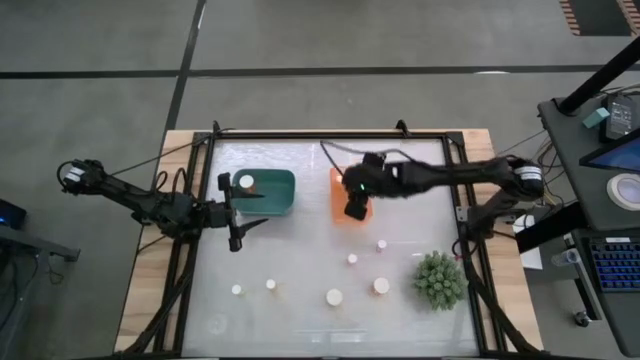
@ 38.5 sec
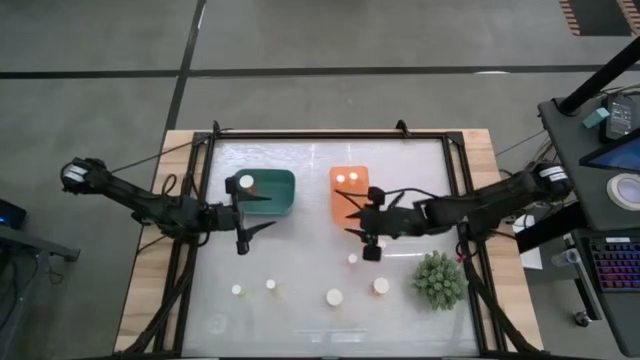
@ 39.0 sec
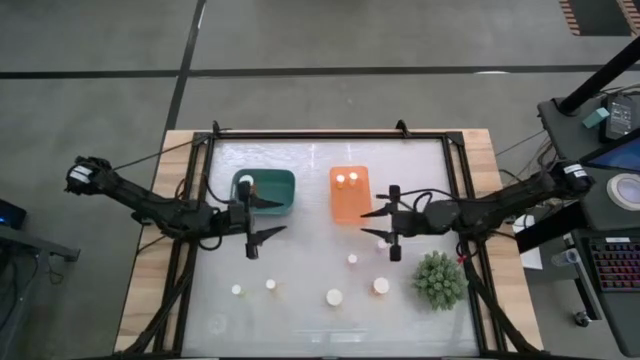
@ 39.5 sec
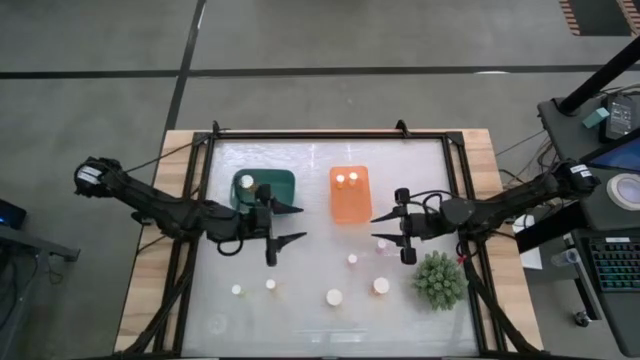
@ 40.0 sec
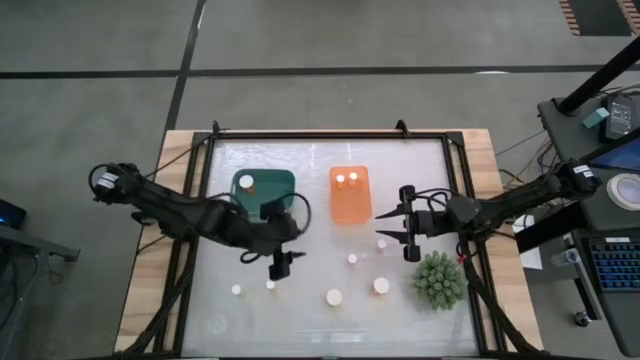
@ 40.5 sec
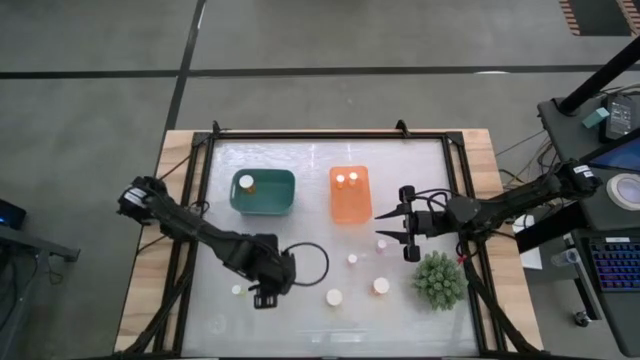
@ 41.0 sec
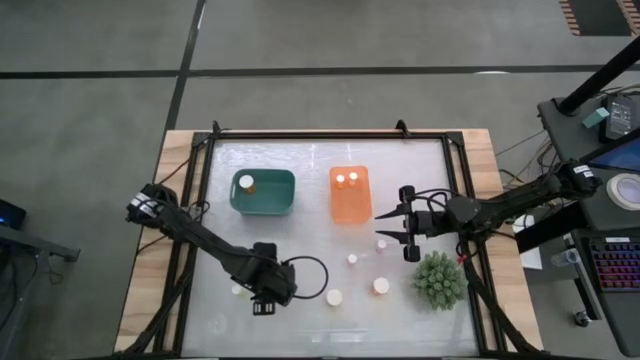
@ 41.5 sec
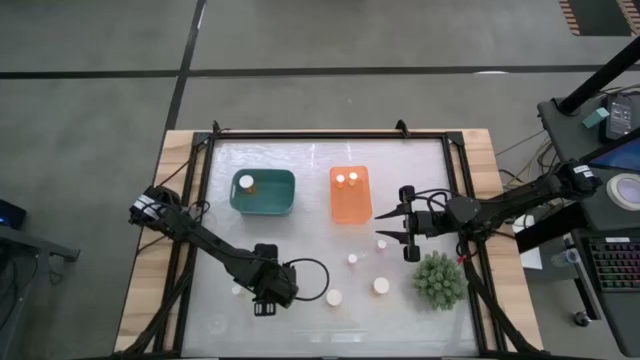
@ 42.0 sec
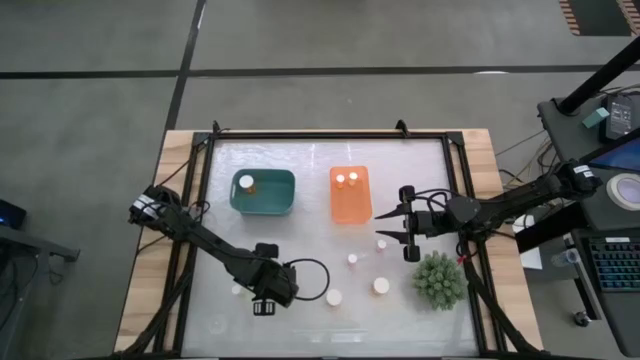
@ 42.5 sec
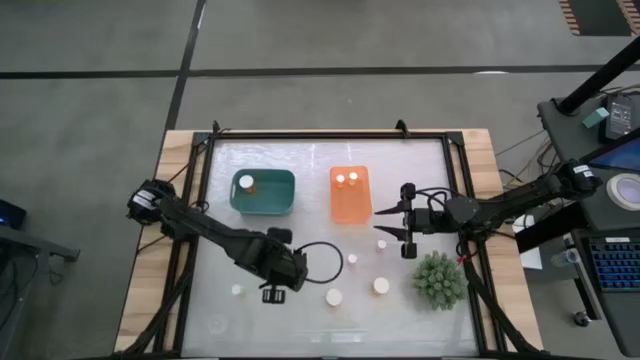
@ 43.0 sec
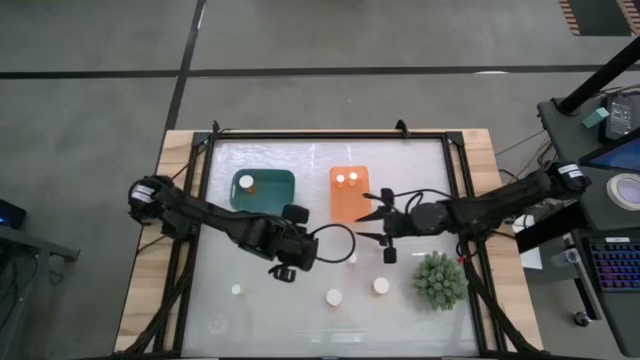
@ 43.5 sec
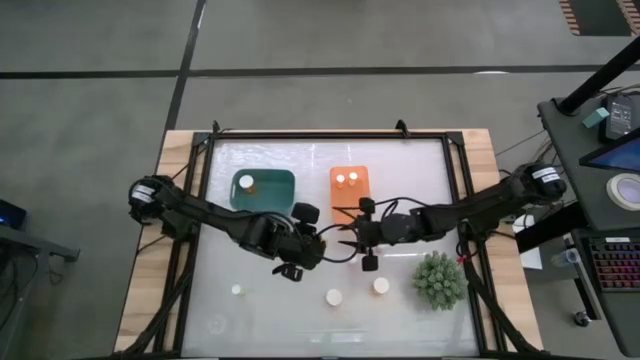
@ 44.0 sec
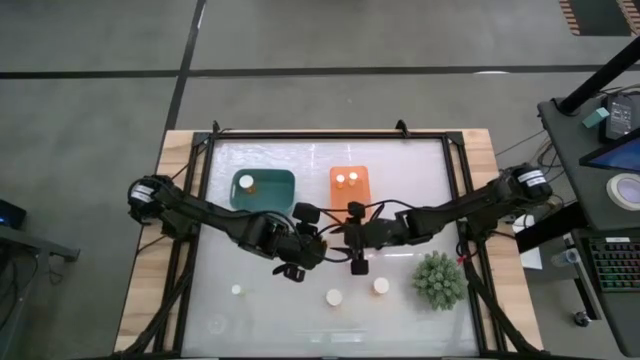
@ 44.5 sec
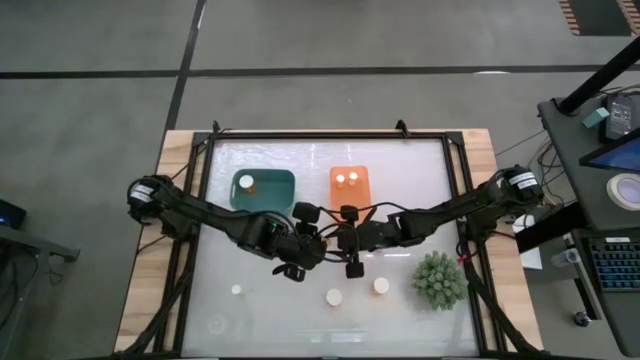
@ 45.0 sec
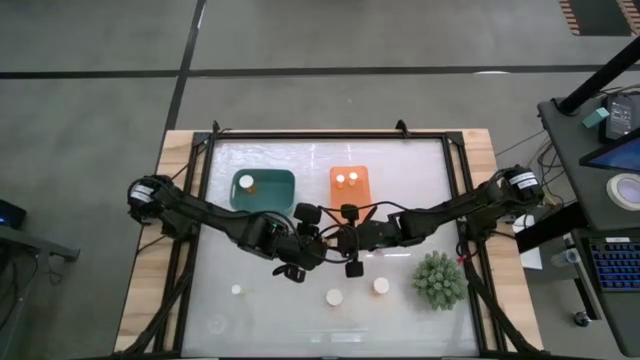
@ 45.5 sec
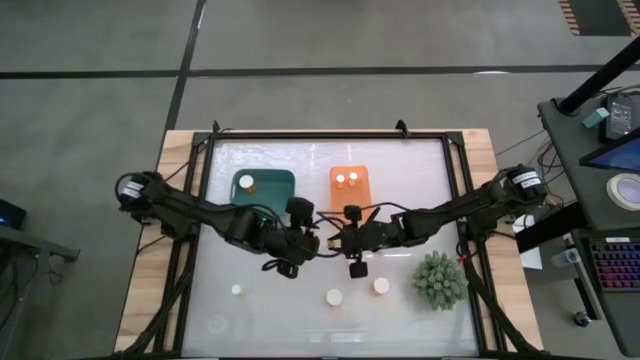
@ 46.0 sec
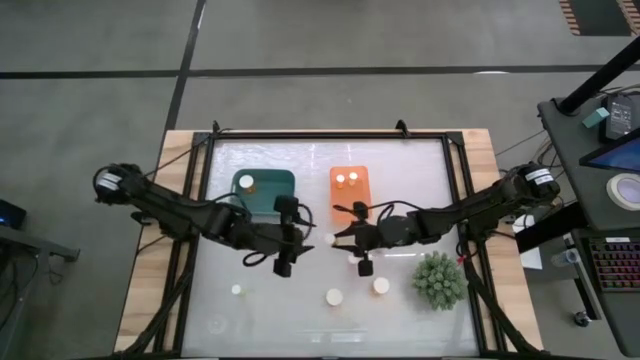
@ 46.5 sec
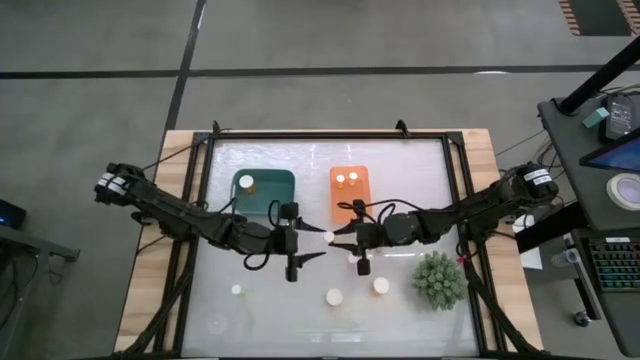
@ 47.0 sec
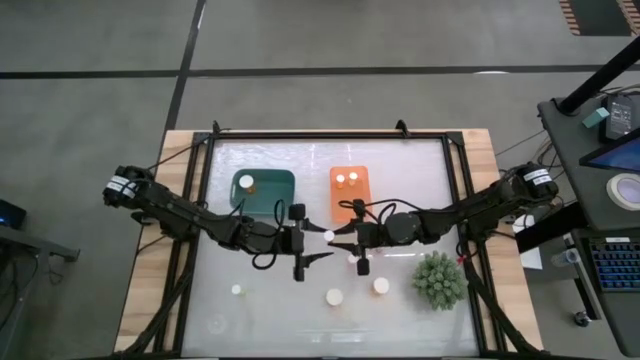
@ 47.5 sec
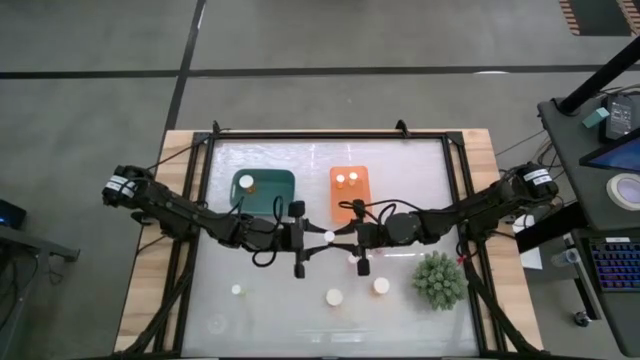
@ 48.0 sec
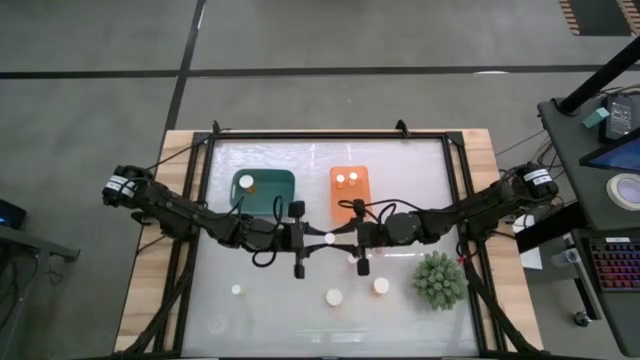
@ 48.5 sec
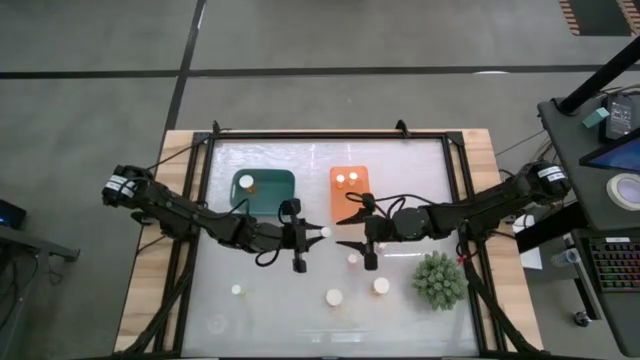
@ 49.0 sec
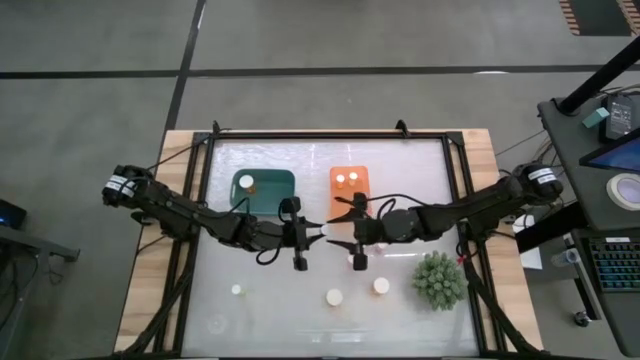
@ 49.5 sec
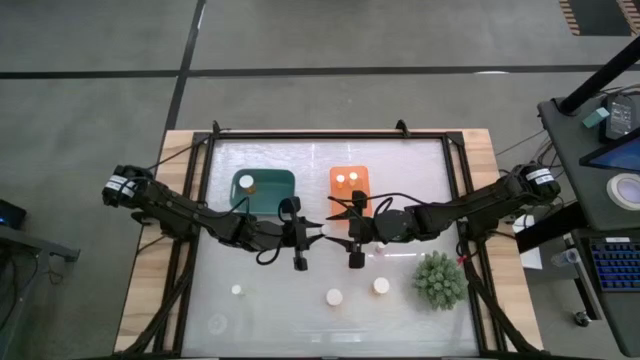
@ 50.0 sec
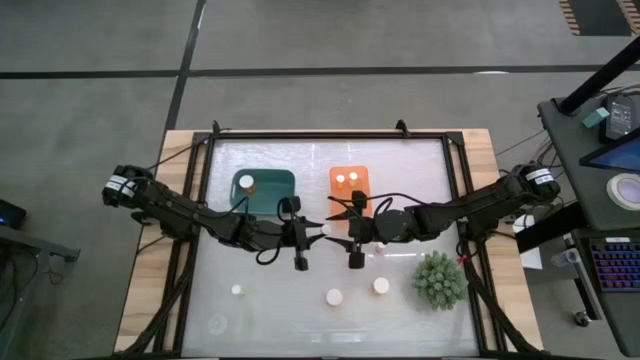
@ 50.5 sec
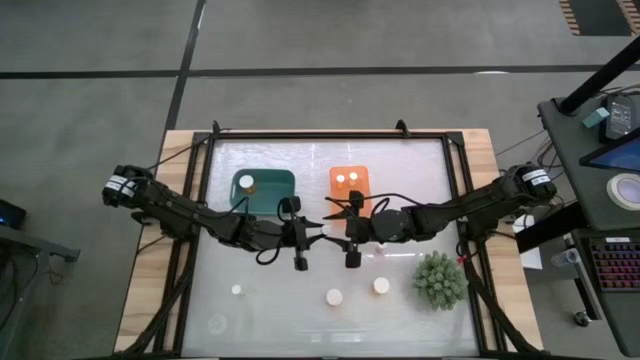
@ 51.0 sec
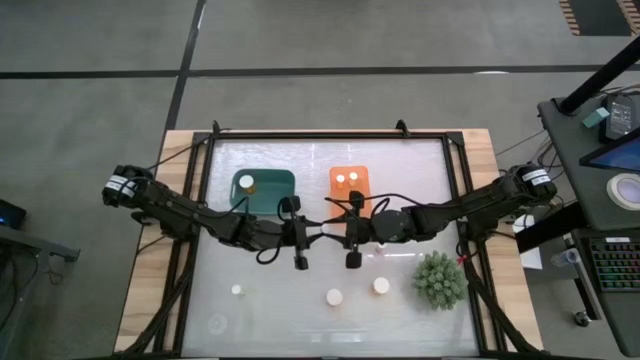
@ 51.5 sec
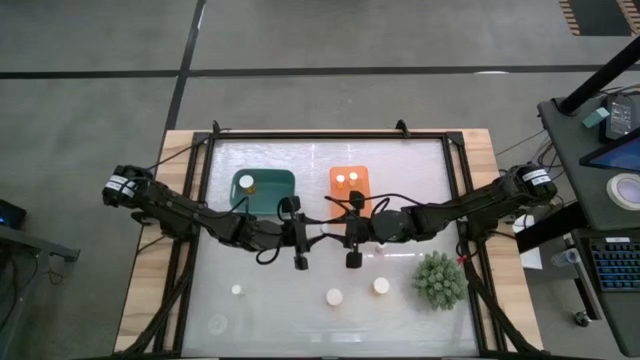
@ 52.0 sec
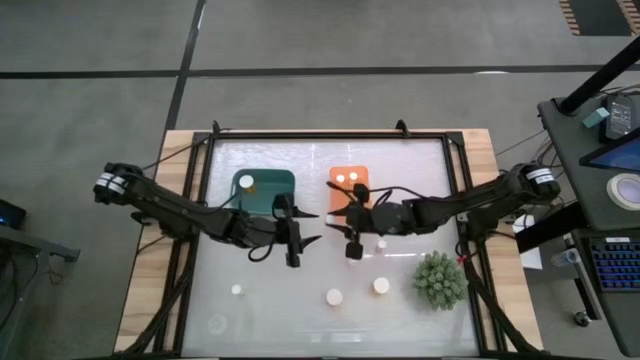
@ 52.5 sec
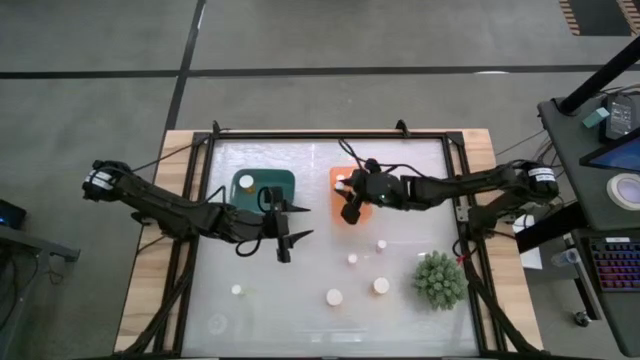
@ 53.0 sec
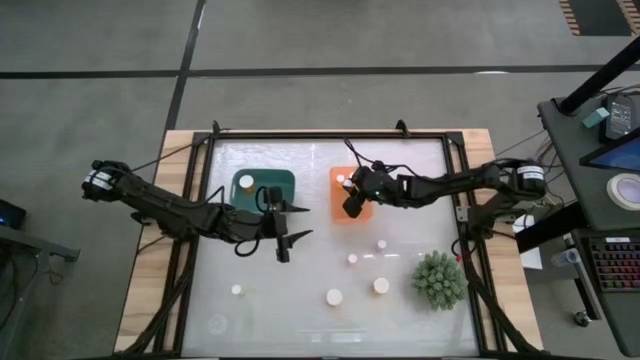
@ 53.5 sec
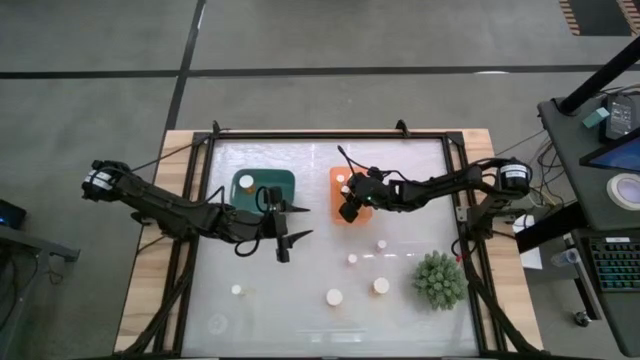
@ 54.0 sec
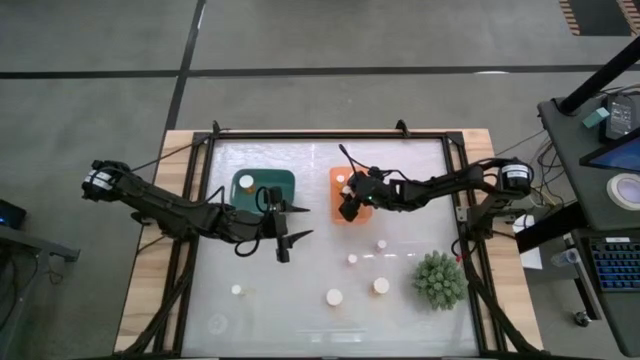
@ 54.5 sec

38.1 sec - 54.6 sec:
Task: Pick and place medicine bottles into bin by pill shape (circle, oval)
Put the small orange pill bottle into the orange bin

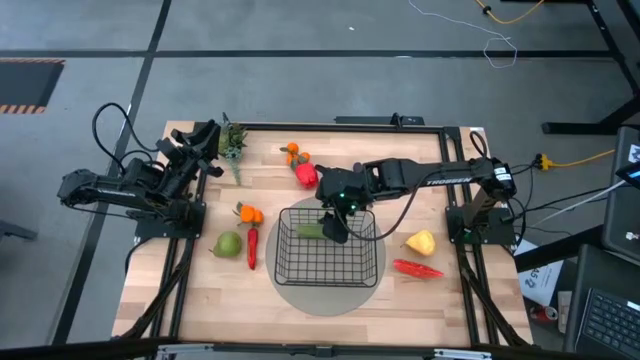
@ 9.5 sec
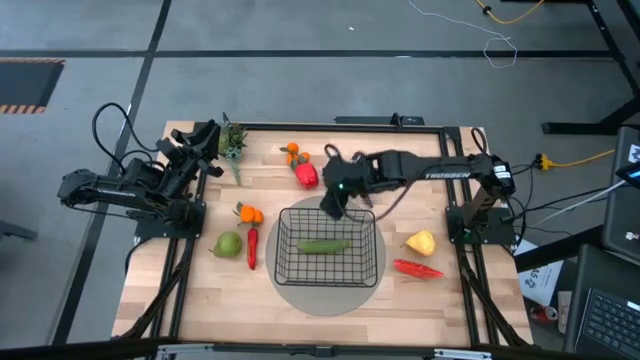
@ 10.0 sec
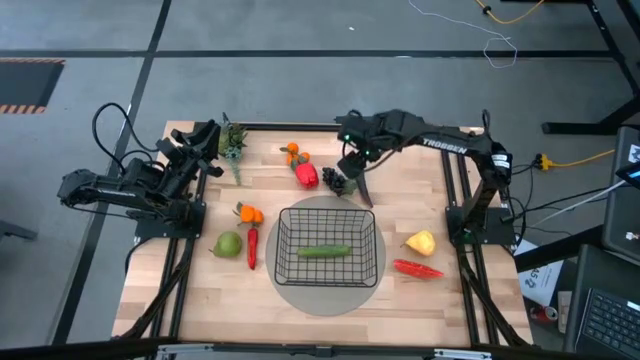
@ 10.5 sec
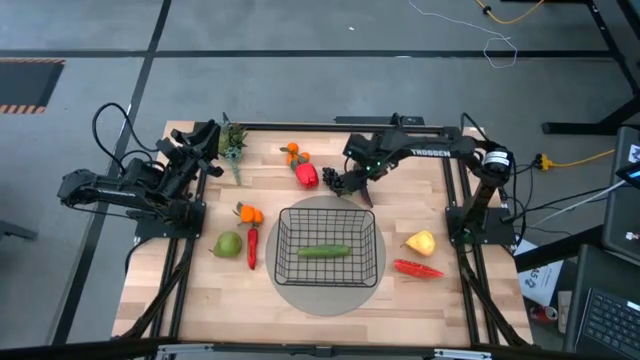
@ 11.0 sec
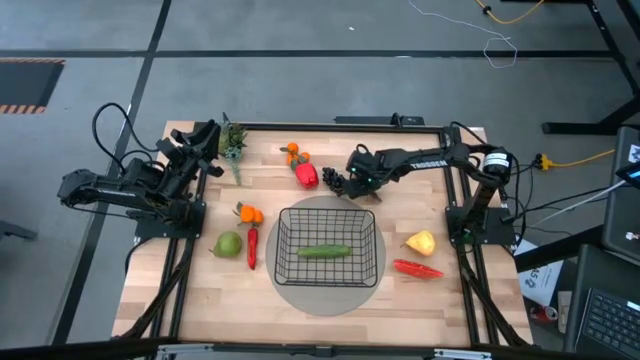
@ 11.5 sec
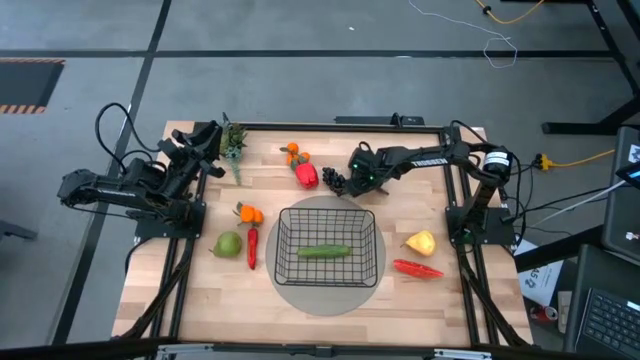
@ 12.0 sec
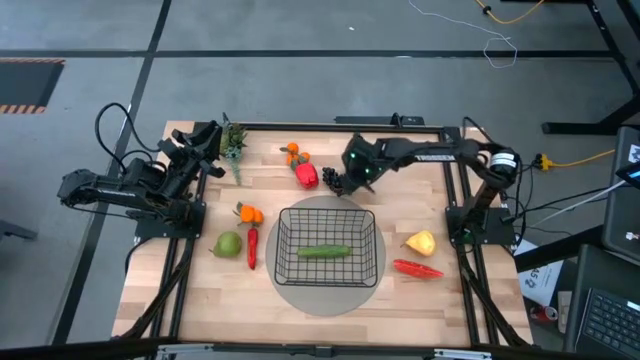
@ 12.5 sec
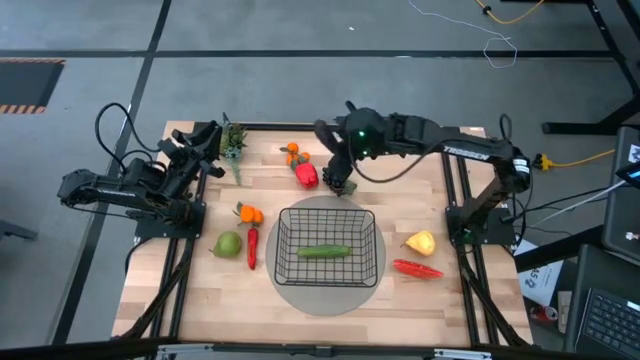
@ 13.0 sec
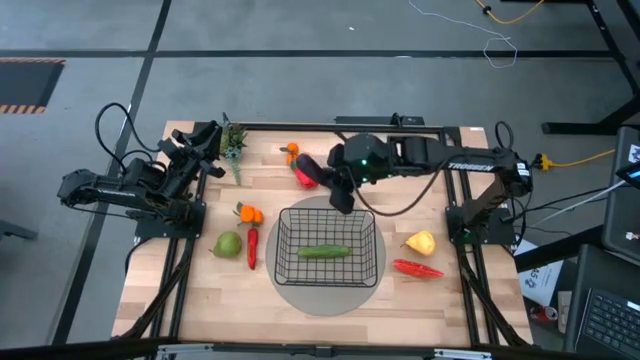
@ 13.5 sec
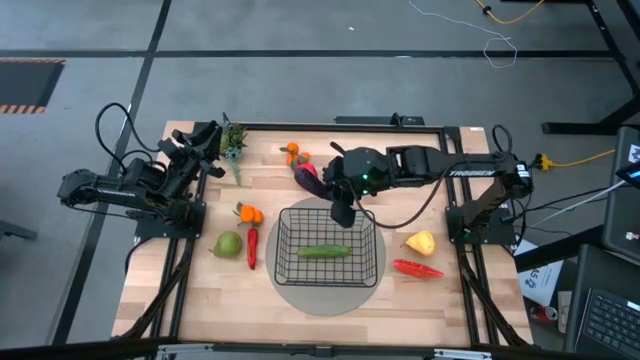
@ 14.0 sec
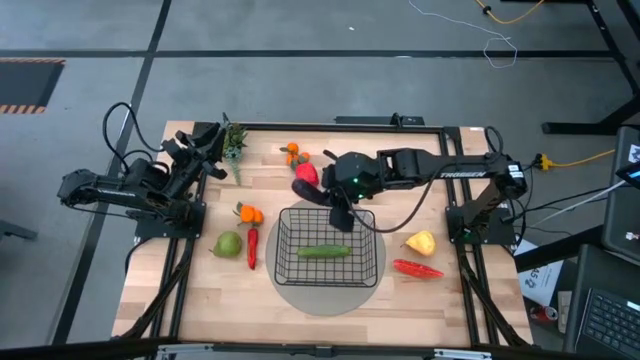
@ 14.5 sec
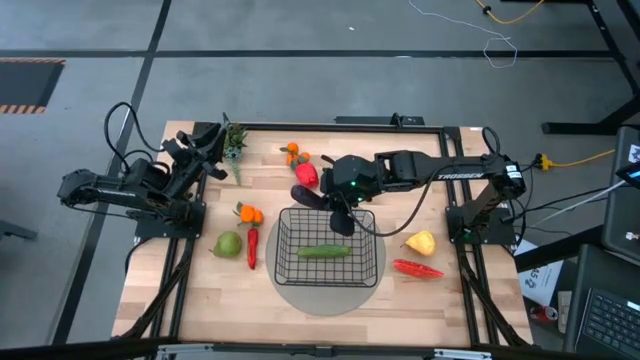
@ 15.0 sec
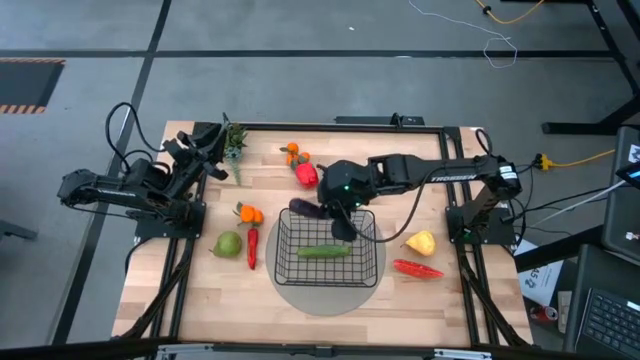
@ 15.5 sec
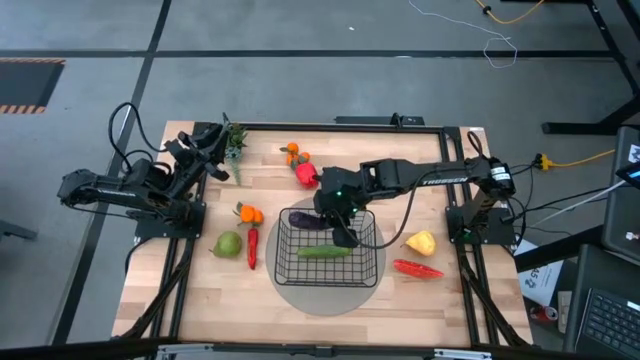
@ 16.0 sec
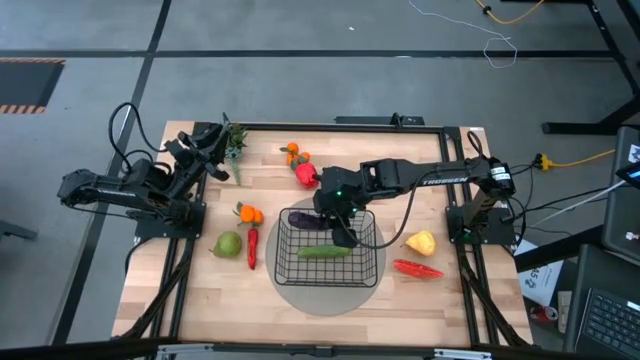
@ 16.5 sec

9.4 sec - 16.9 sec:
Task: Build produce basket
Put the violet eggplant into the black wire basket
